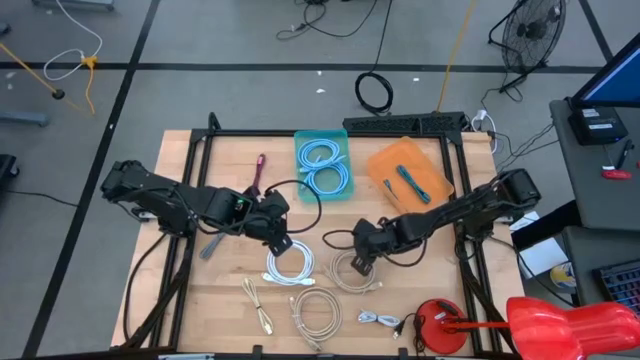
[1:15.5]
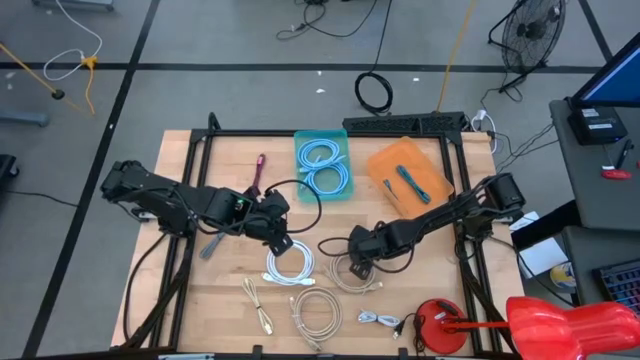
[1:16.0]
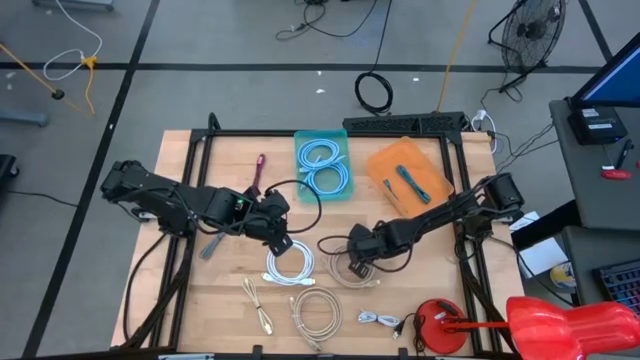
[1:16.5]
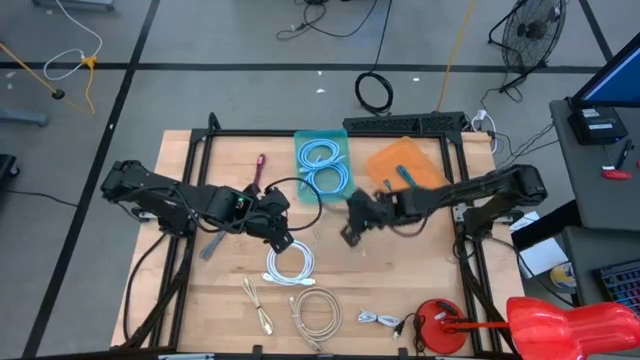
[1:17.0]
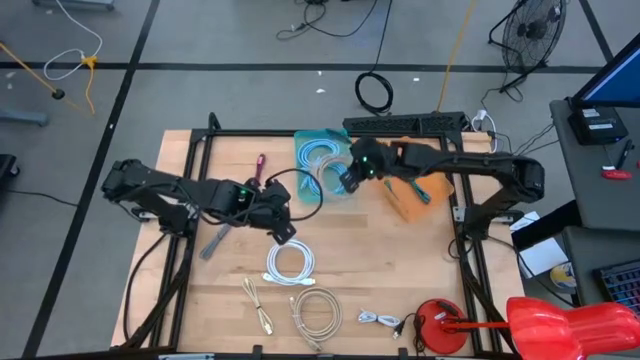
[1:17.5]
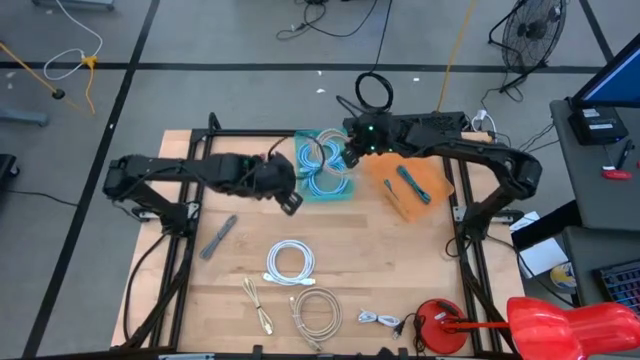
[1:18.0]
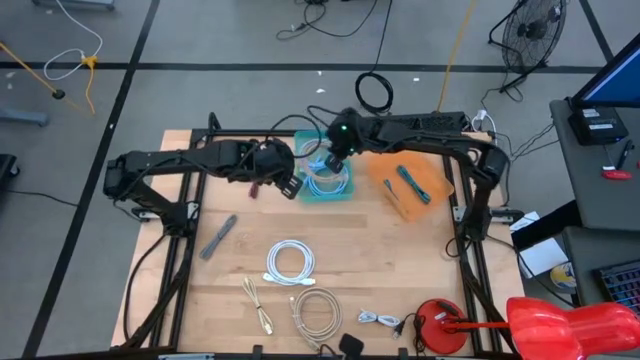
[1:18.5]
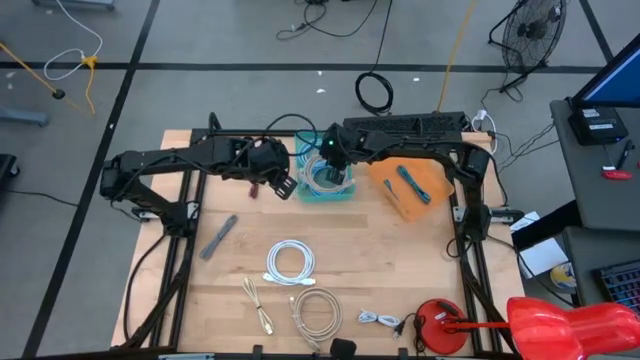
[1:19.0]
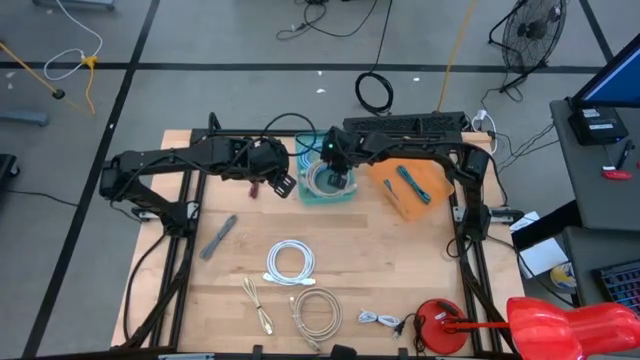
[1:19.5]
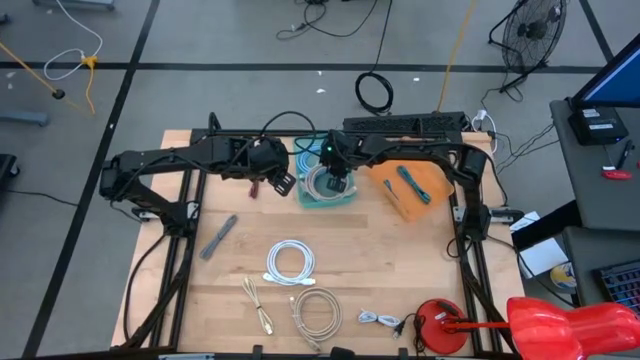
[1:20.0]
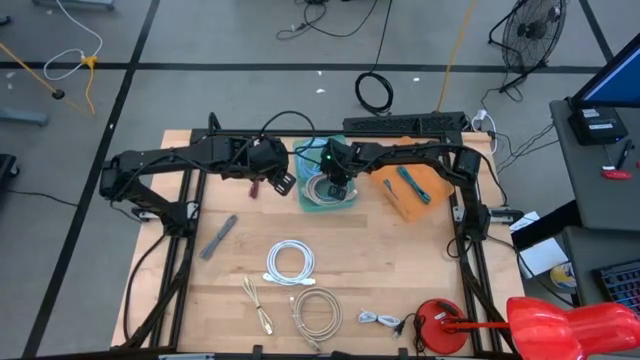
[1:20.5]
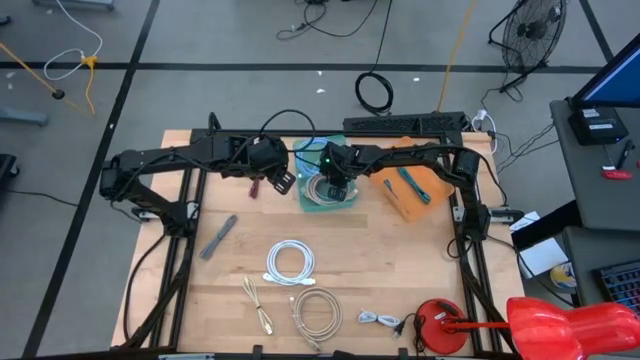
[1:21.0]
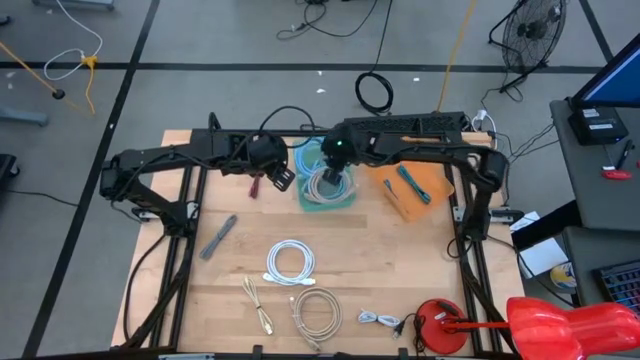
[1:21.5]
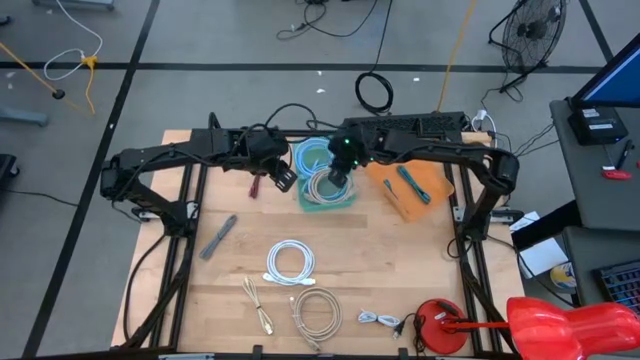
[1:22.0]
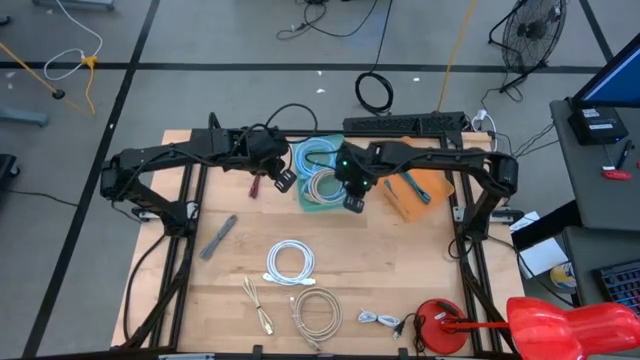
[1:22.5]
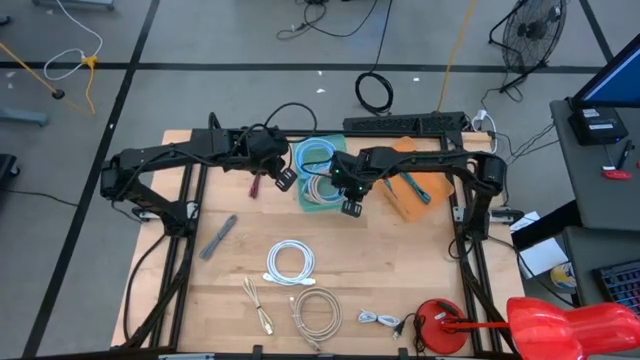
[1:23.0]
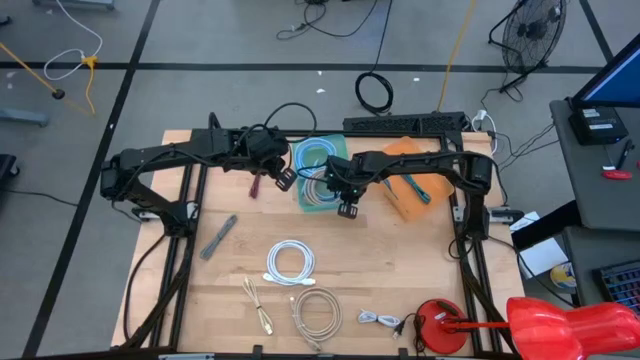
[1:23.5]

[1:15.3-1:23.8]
Task: Pick & Place USB Port
Put the top brown charger cable into the green bin

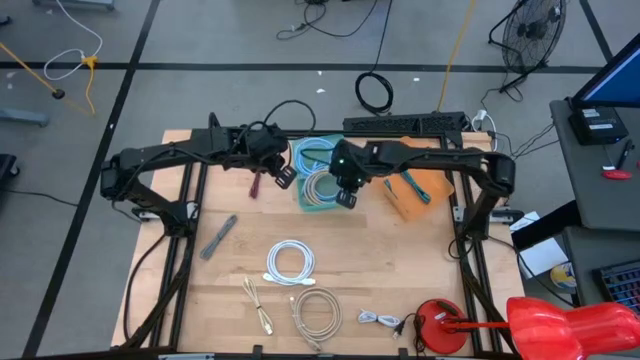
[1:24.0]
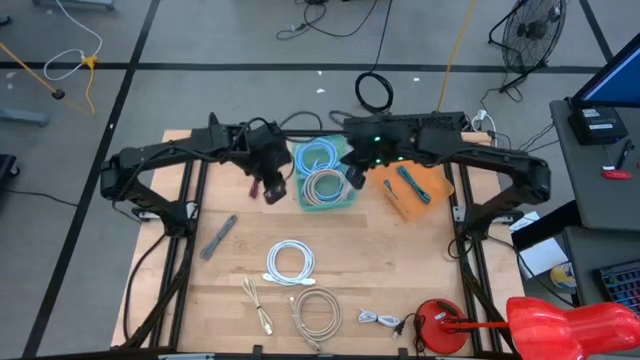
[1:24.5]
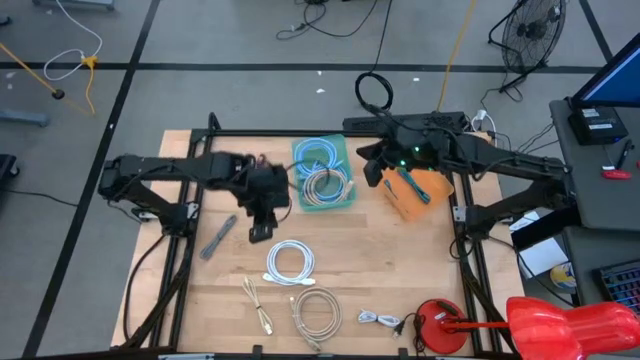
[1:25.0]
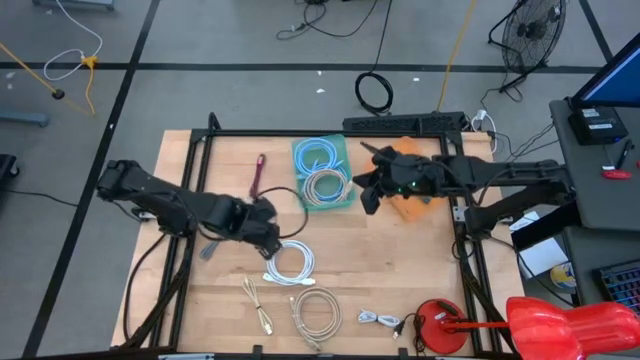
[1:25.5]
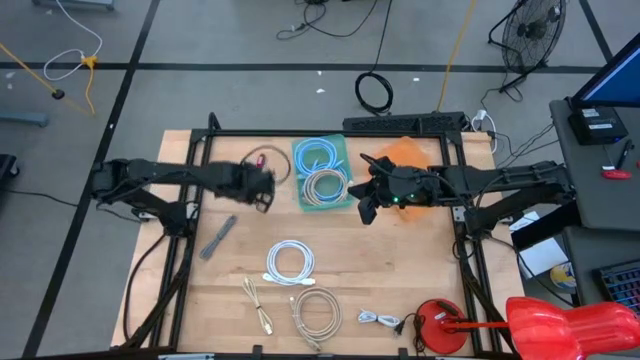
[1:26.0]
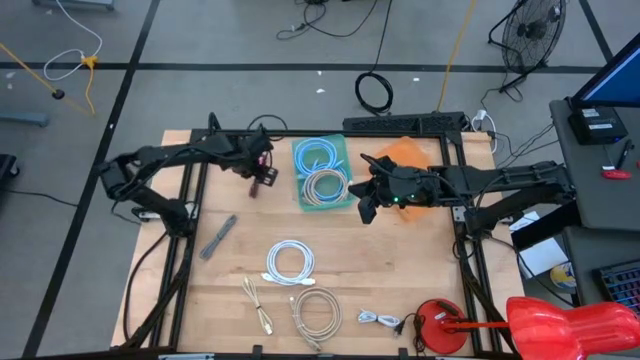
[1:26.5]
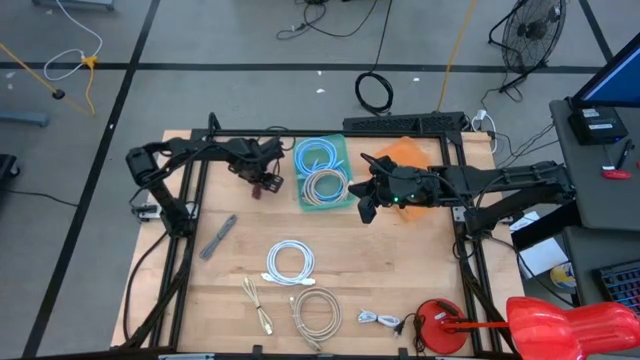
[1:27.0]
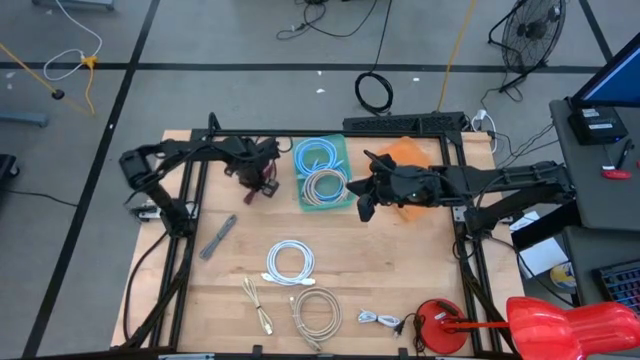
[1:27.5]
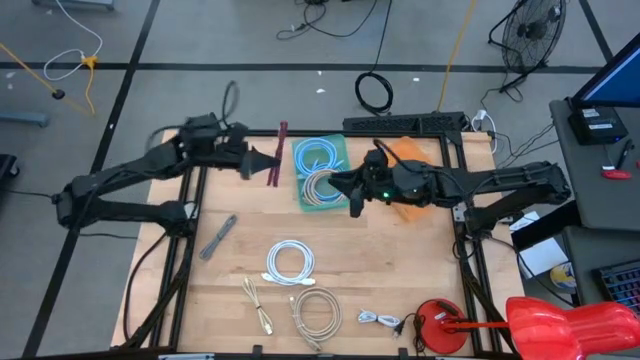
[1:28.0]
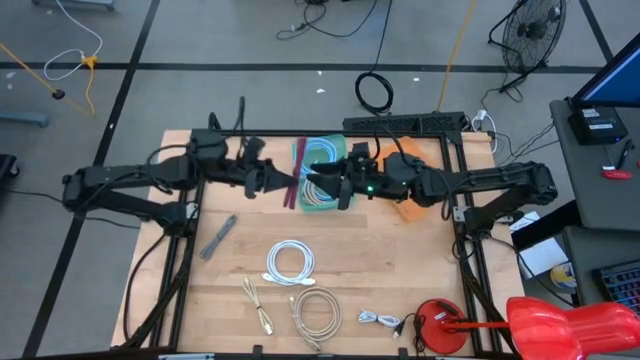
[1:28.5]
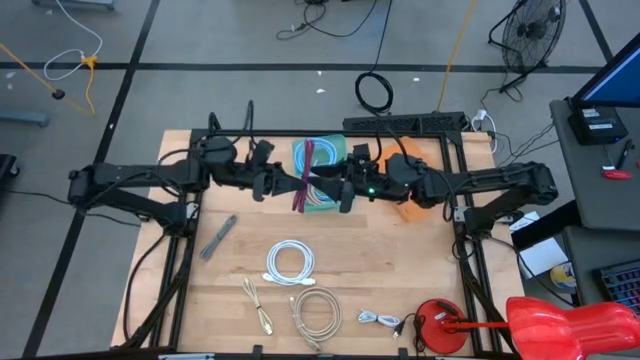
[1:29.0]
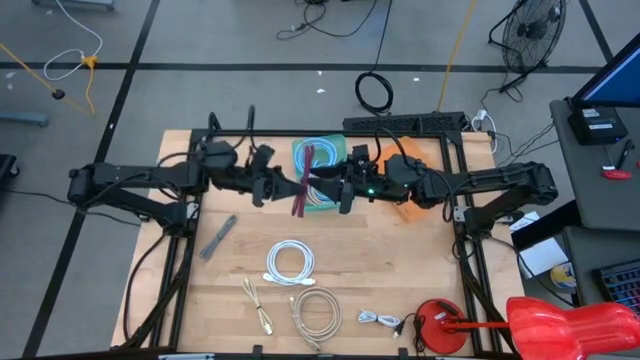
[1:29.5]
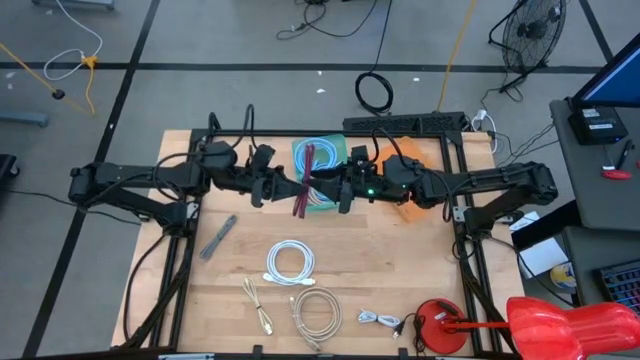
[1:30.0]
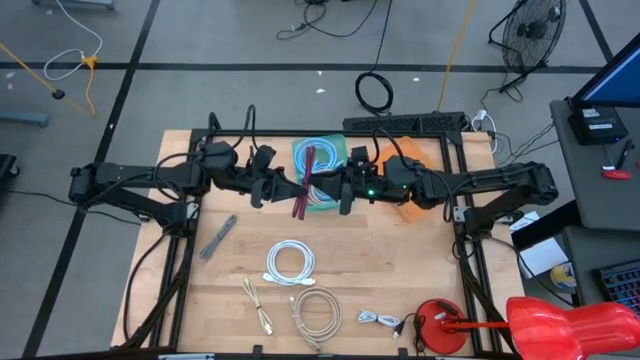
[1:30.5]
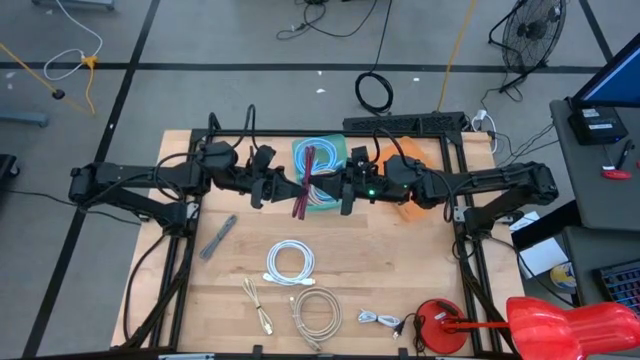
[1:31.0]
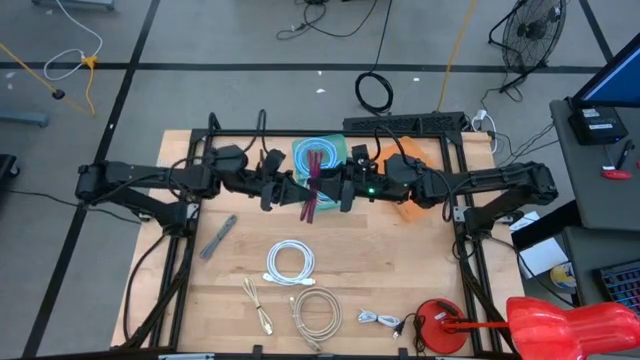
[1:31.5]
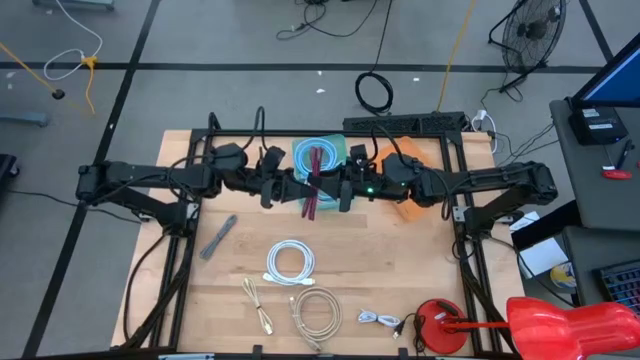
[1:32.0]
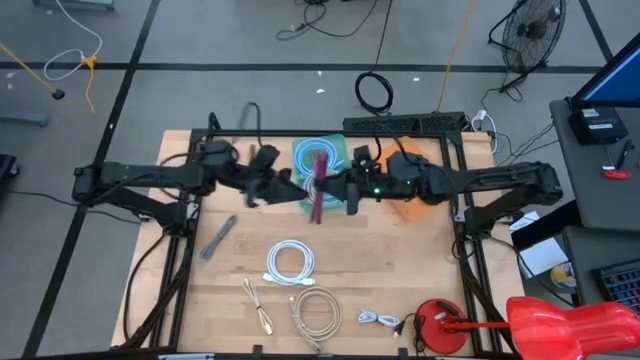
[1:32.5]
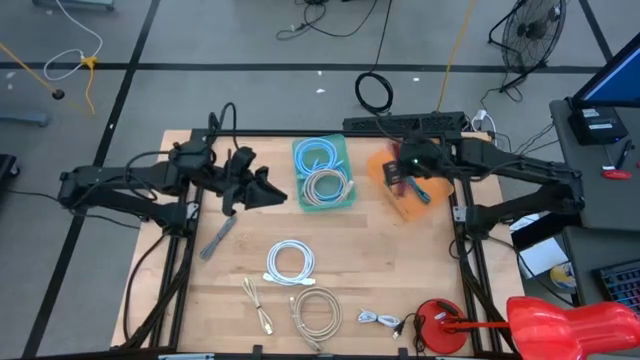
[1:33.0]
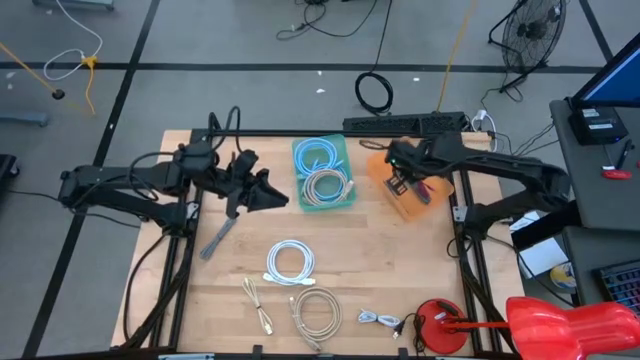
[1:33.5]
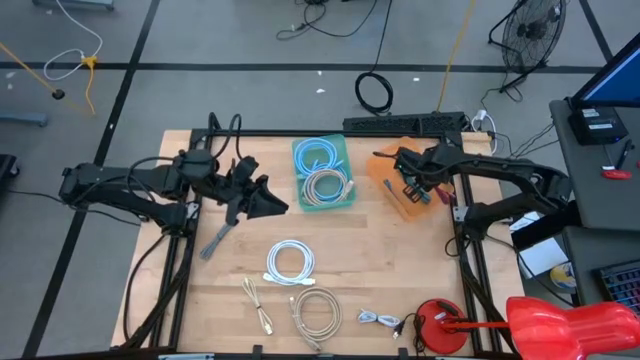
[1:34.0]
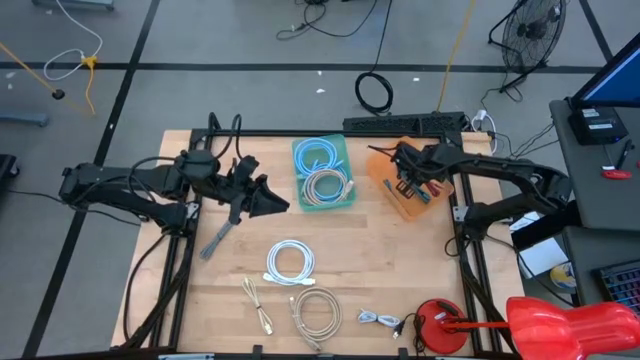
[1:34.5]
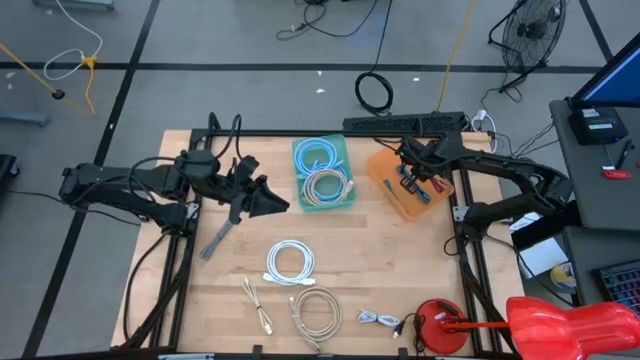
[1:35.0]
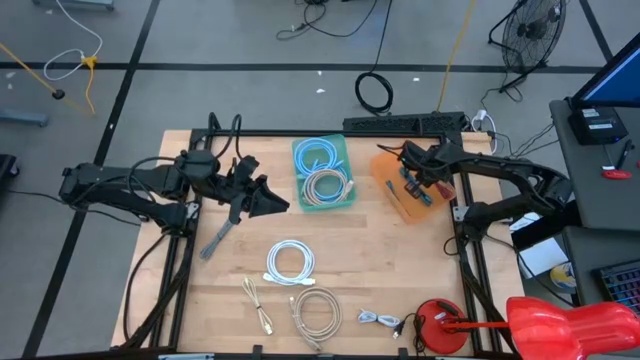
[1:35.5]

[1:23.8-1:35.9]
Put the violet charger cable into the orange bin
